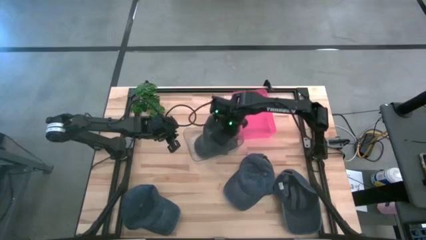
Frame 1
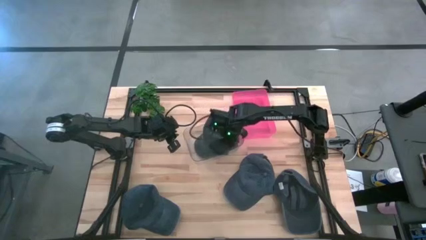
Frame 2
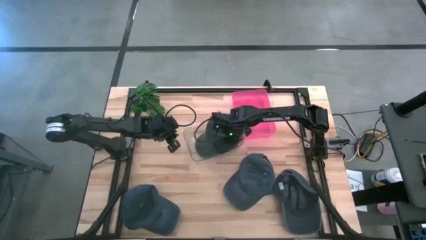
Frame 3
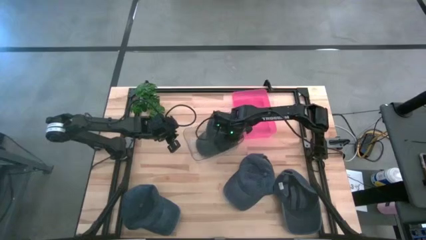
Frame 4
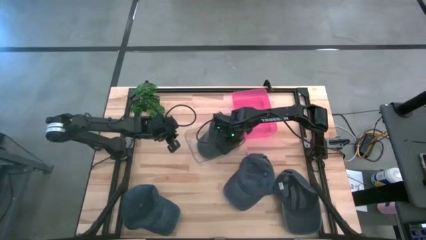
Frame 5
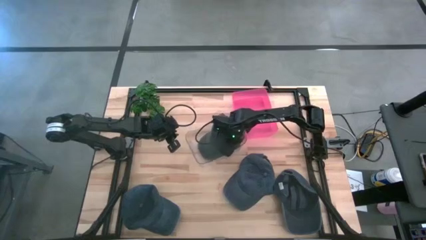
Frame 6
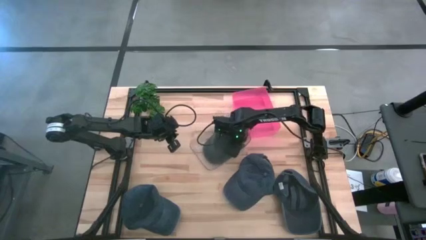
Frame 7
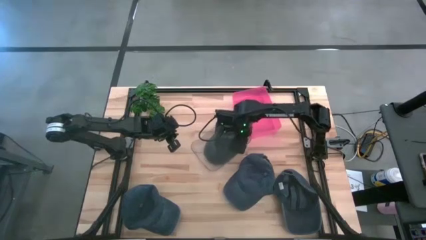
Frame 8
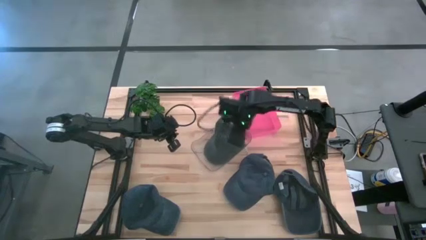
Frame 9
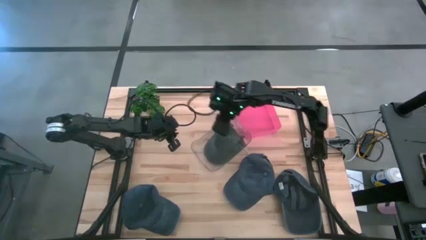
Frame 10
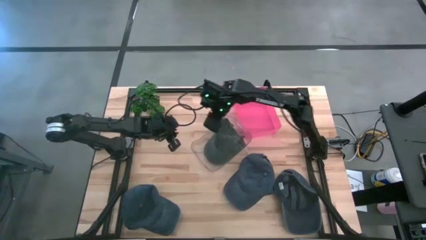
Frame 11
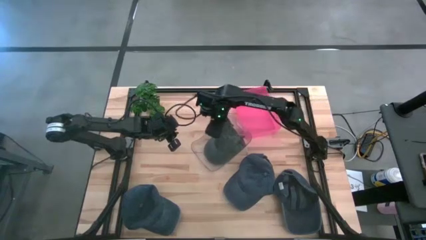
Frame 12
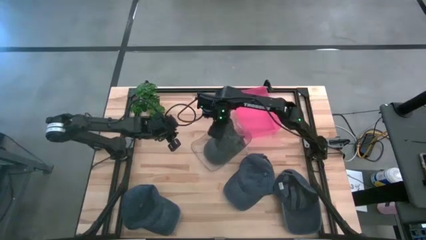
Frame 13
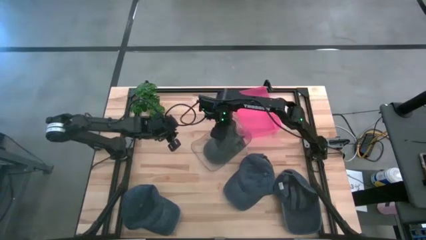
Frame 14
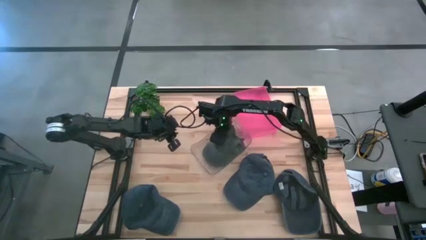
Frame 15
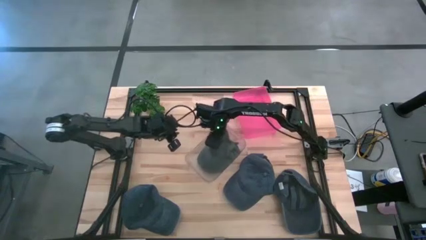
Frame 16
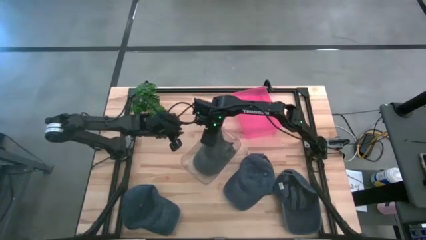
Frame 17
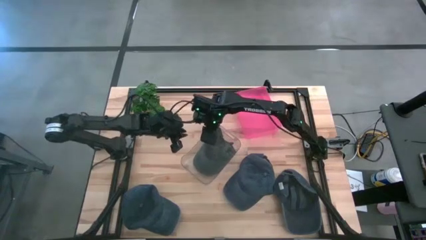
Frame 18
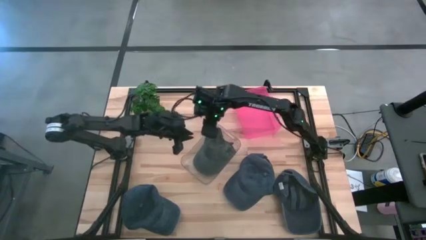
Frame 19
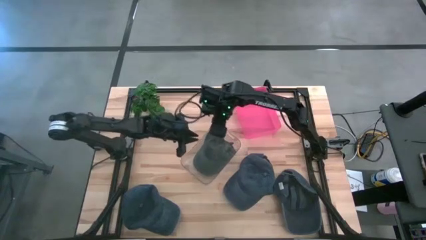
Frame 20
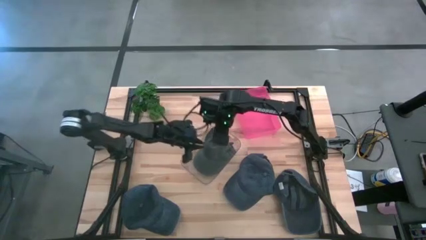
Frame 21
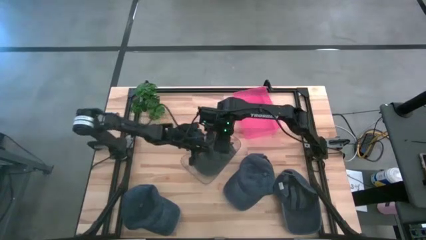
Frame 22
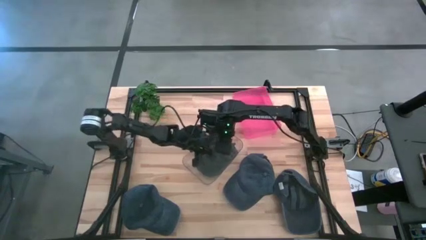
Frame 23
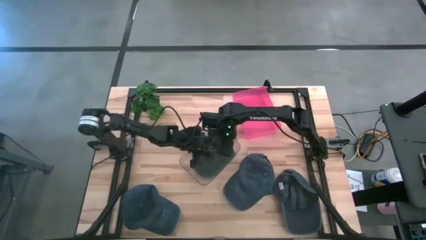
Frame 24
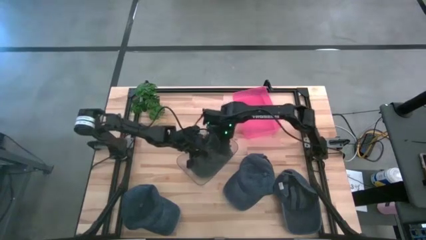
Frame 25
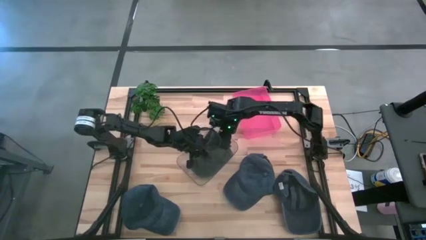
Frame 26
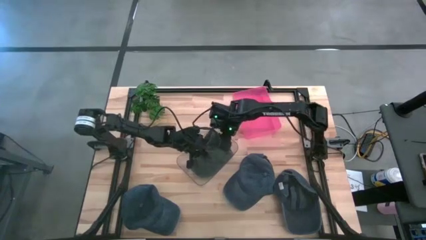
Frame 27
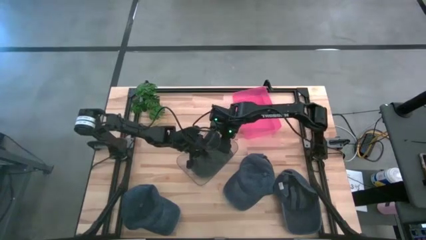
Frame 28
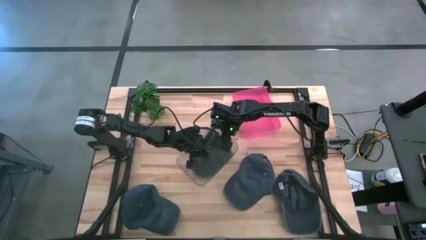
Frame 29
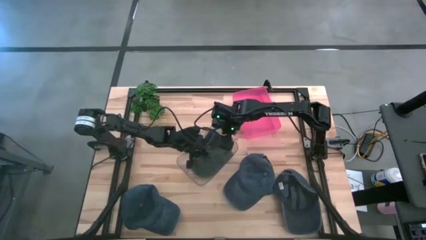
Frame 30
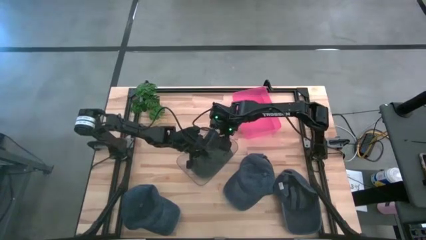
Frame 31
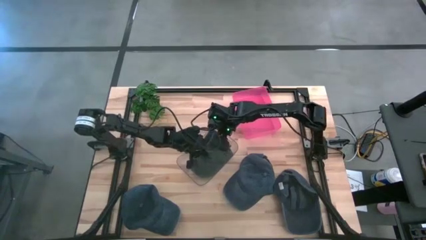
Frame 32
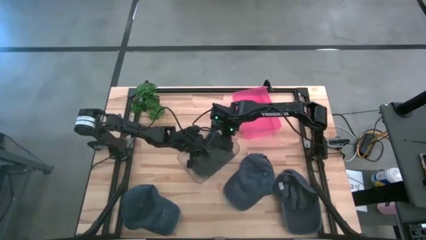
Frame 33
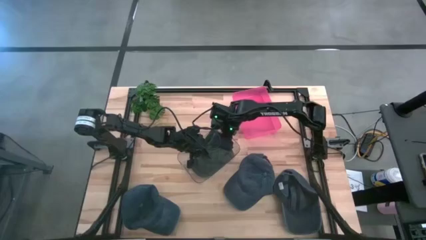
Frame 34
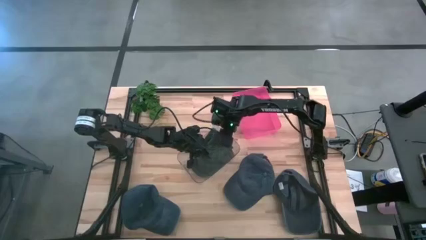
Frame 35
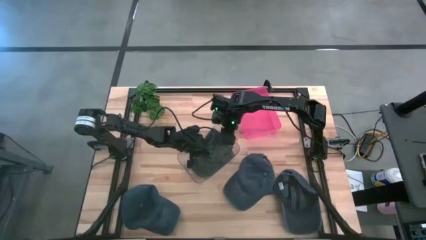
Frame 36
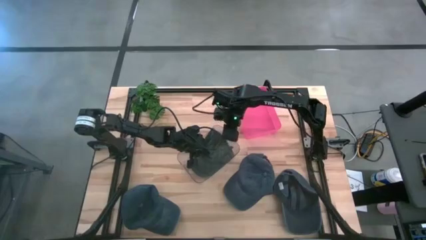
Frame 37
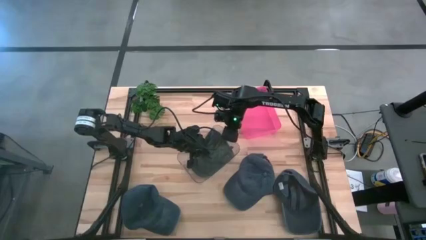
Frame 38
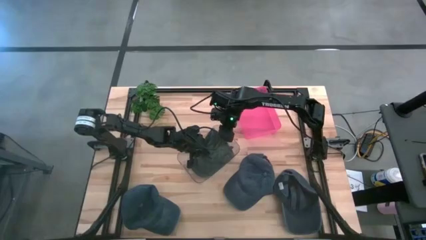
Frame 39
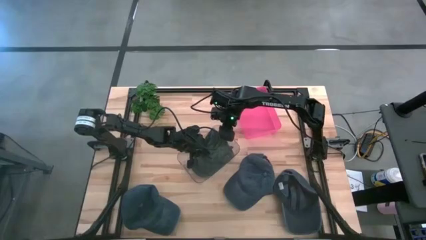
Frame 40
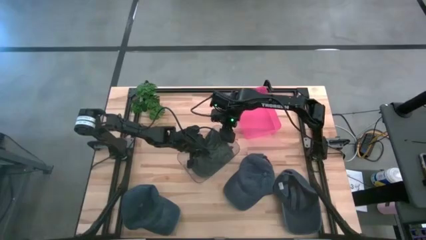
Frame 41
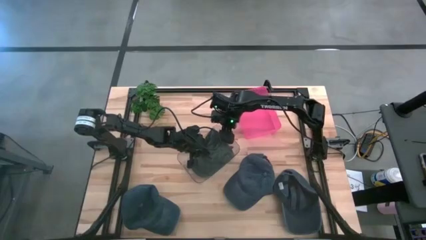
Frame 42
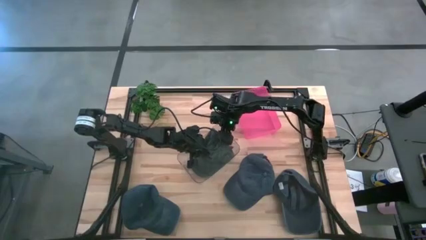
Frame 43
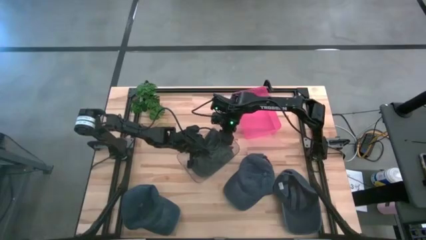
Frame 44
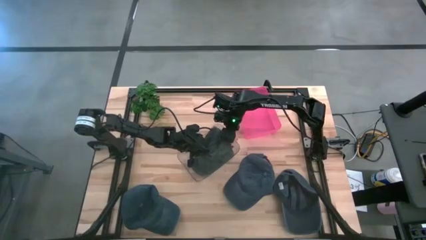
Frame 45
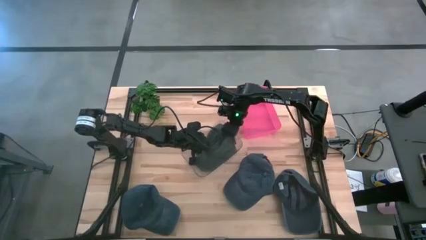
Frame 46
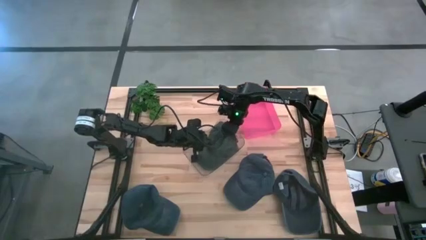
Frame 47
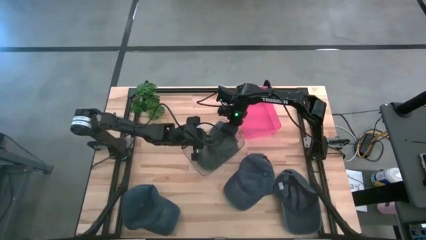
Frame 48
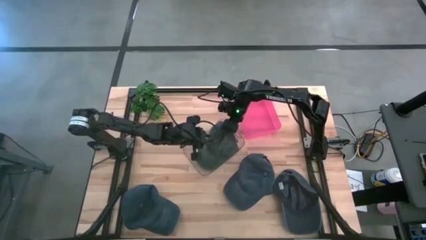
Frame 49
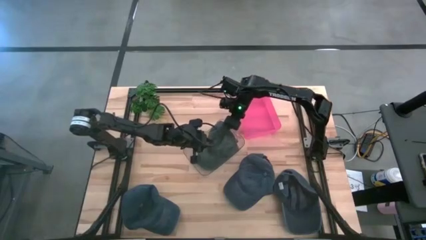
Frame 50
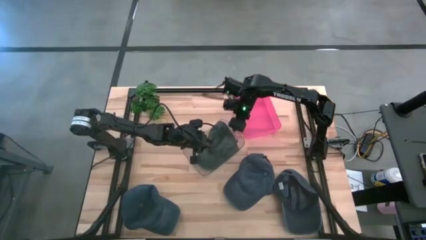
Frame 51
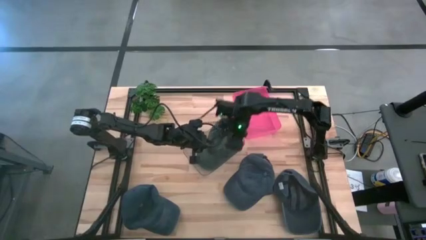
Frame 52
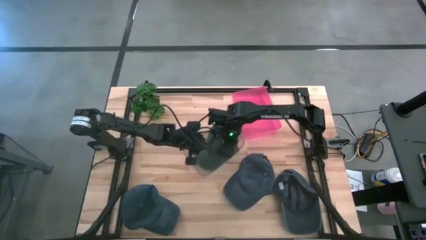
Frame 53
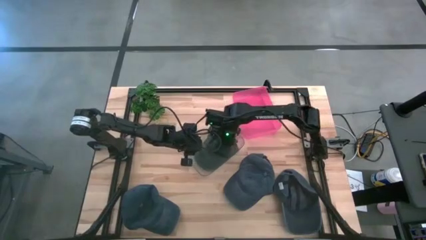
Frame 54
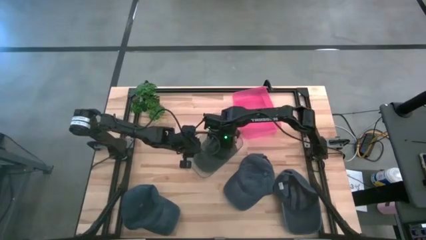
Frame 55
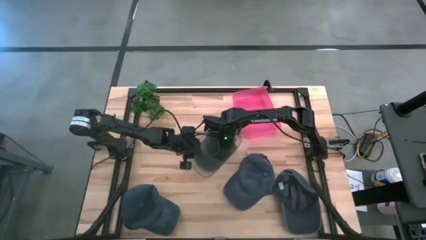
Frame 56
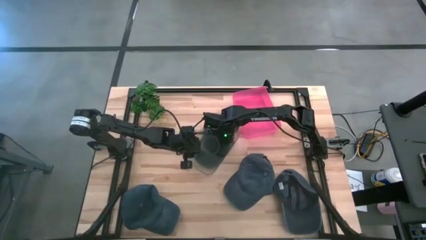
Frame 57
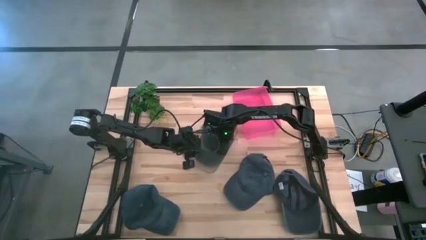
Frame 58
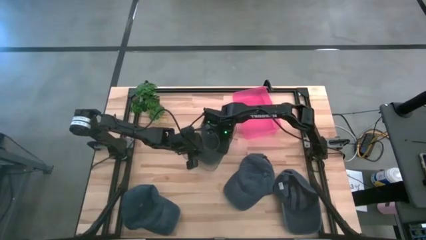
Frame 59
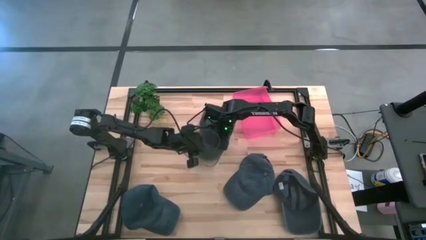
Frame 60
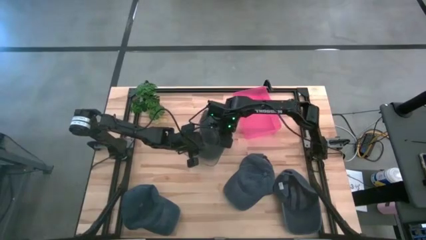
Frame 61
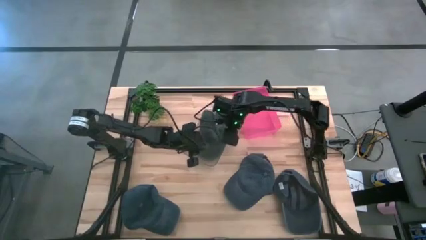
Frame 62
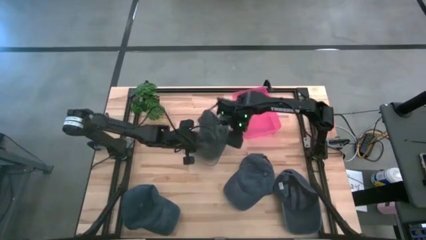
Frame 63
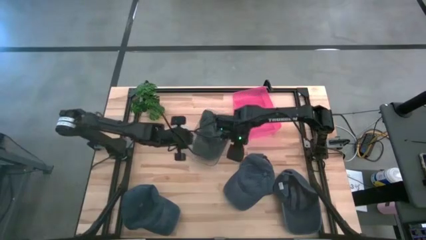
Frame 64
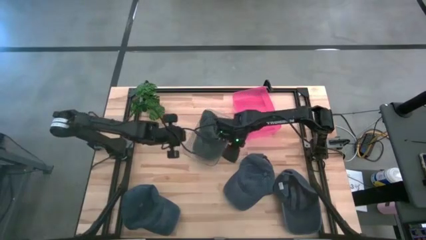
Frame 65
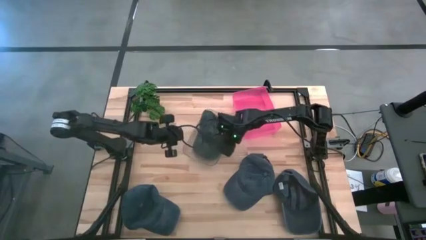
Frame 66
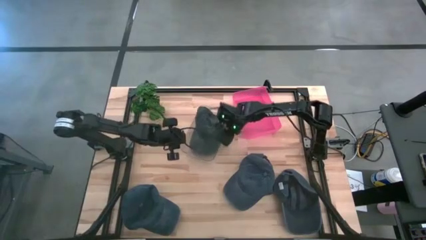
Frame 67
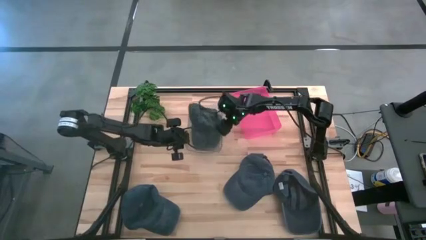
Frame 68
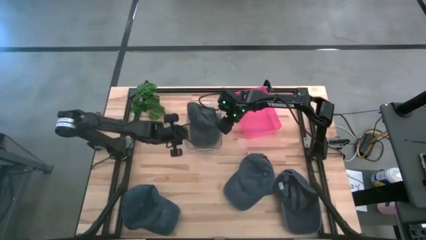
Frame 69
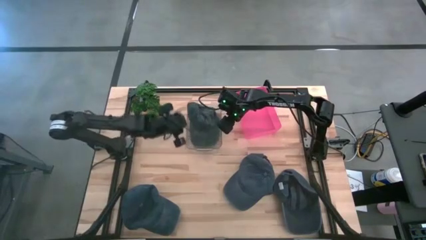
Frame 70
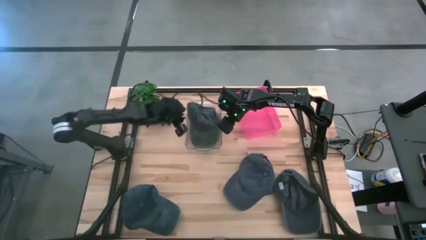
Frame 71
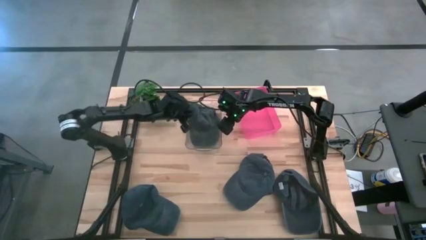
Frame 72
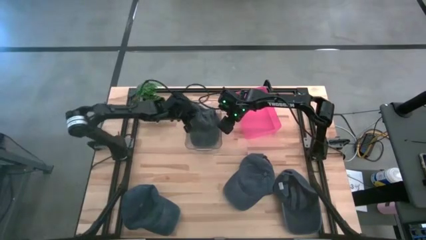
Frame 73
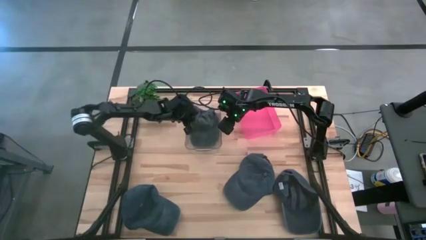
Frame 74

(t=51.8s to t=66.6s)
Task: Pick & Place hat
Put the black cap into the transparent bin

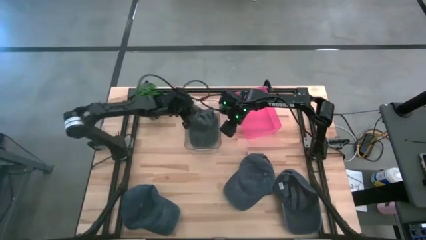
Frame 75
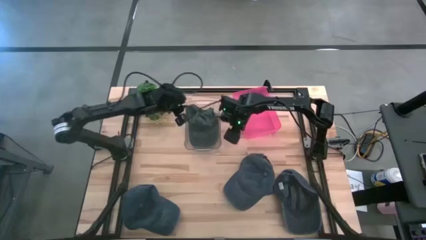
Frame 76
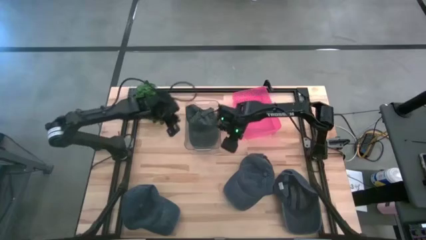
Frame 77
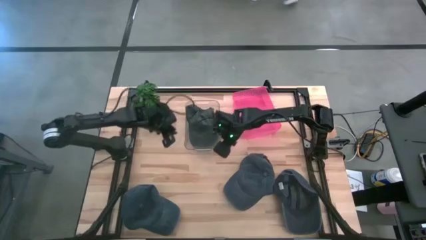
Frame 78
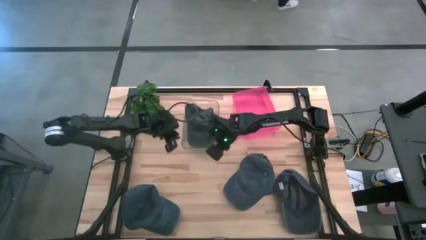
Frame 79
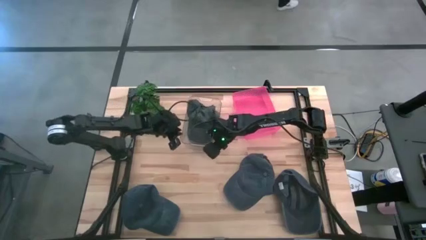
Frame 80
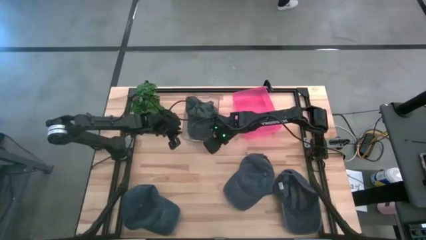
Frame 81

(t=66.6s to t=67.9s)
Adjust the red bin on the table
